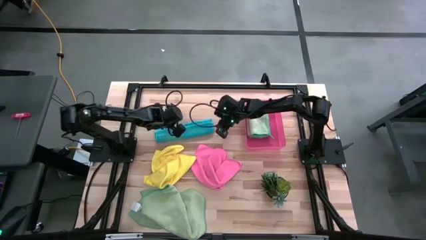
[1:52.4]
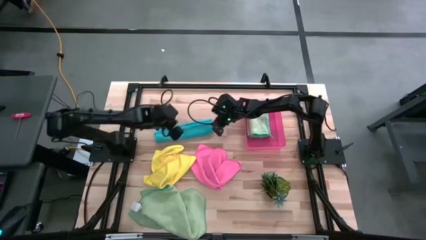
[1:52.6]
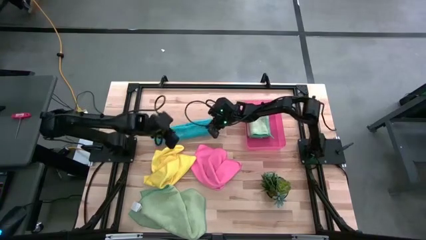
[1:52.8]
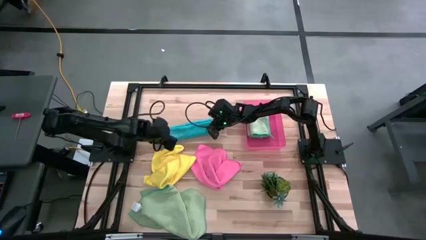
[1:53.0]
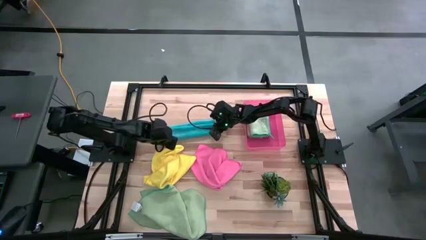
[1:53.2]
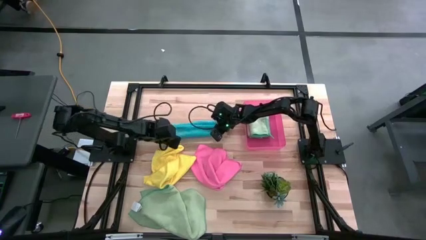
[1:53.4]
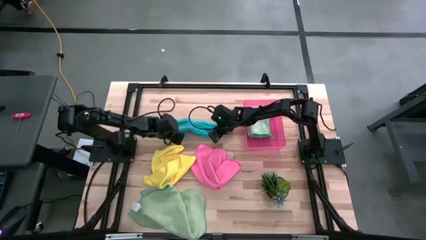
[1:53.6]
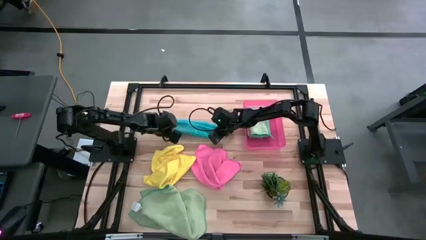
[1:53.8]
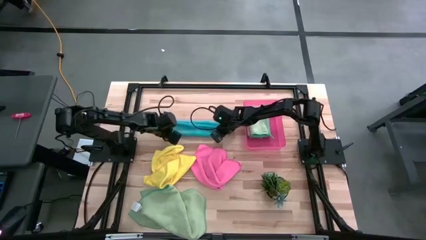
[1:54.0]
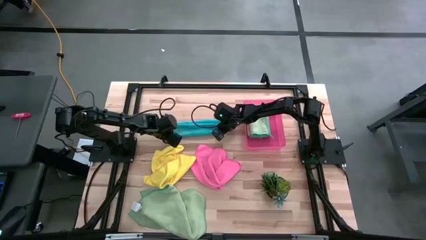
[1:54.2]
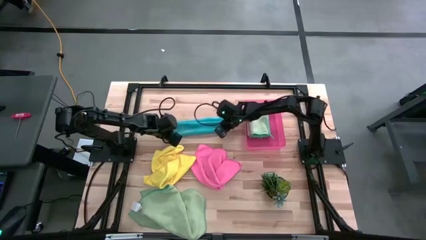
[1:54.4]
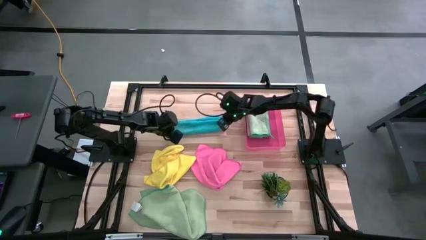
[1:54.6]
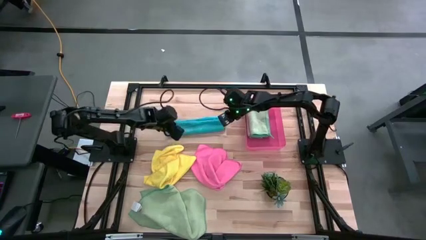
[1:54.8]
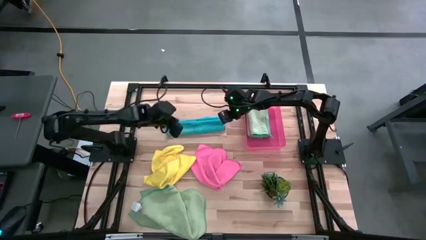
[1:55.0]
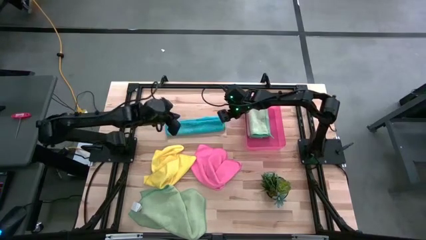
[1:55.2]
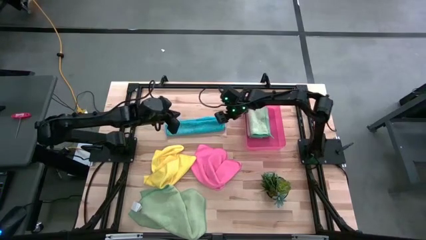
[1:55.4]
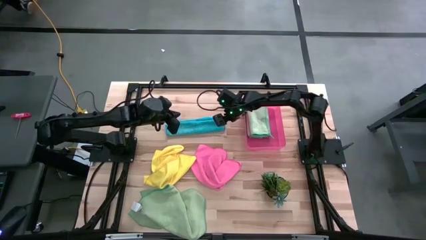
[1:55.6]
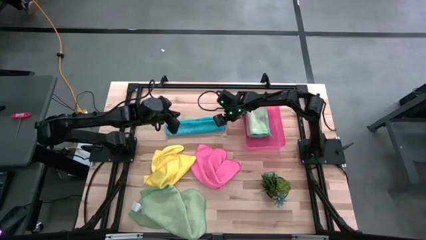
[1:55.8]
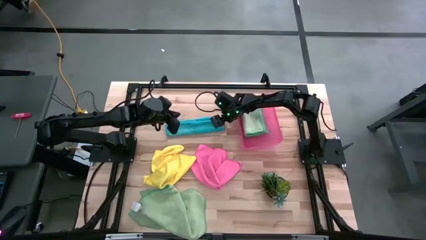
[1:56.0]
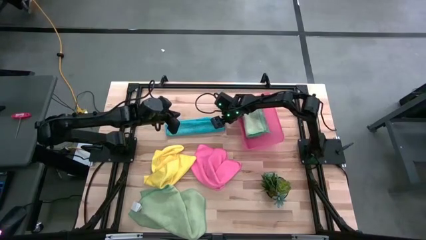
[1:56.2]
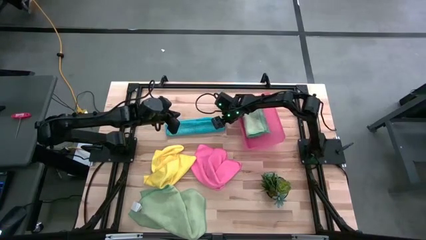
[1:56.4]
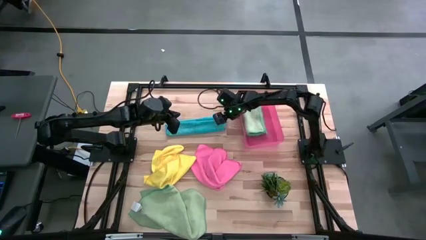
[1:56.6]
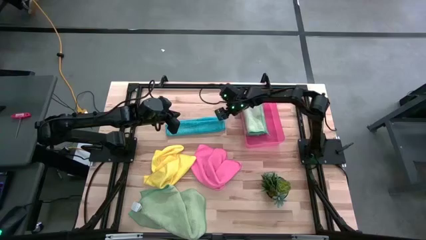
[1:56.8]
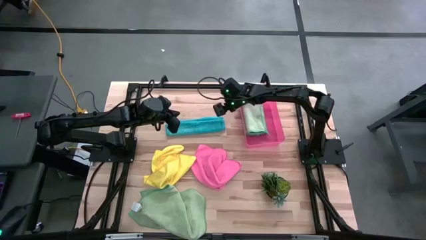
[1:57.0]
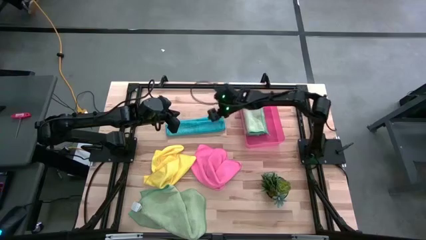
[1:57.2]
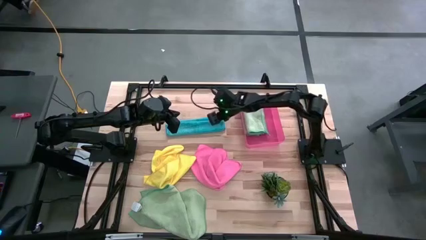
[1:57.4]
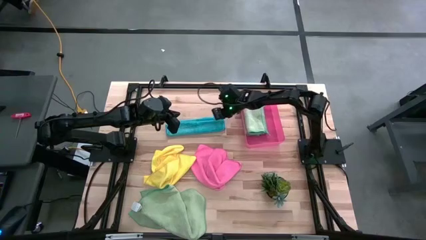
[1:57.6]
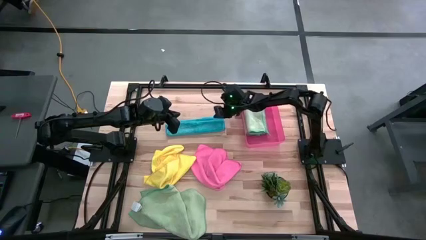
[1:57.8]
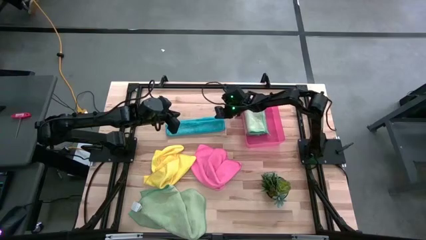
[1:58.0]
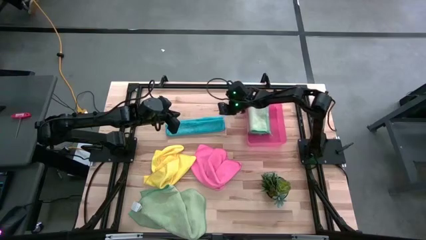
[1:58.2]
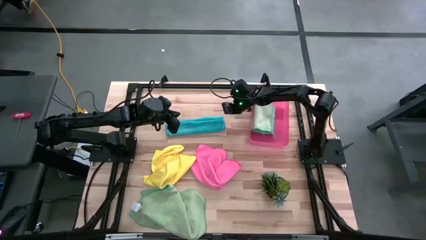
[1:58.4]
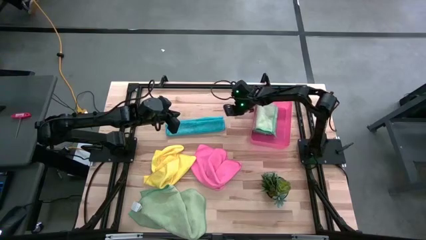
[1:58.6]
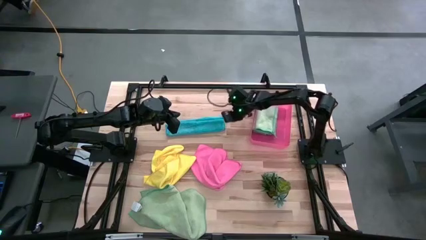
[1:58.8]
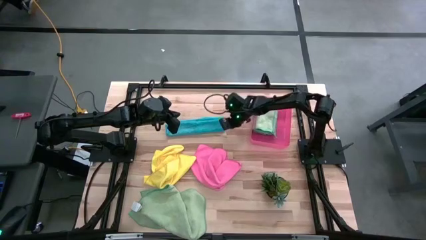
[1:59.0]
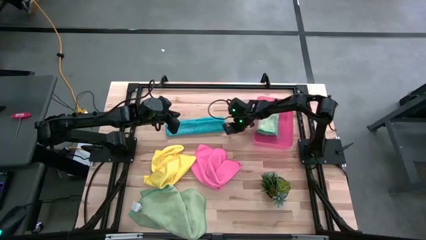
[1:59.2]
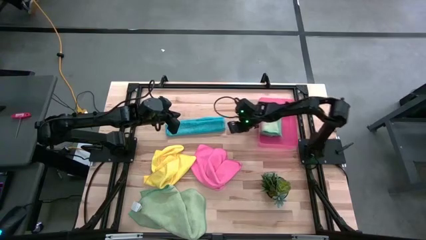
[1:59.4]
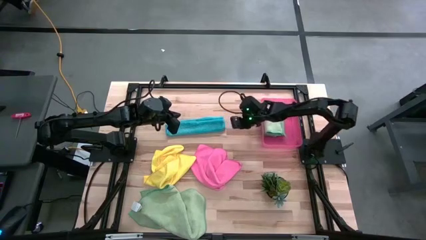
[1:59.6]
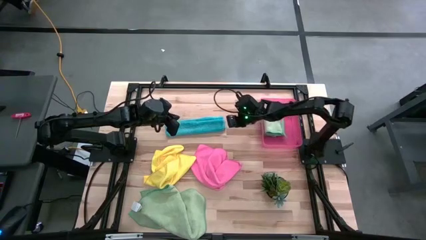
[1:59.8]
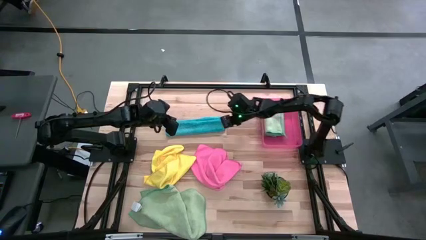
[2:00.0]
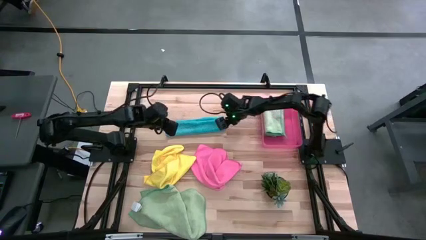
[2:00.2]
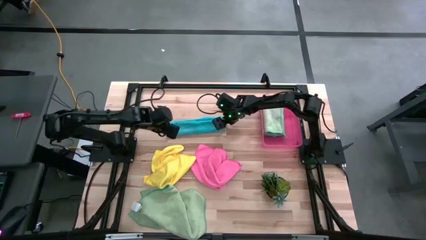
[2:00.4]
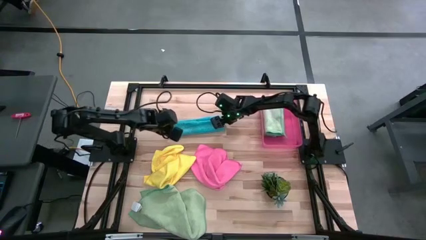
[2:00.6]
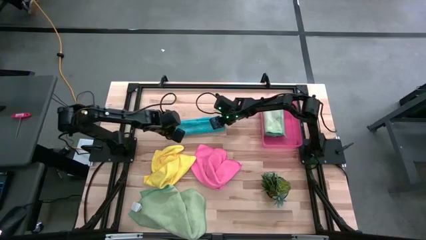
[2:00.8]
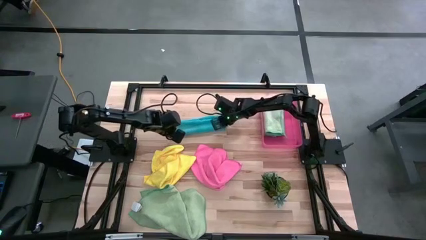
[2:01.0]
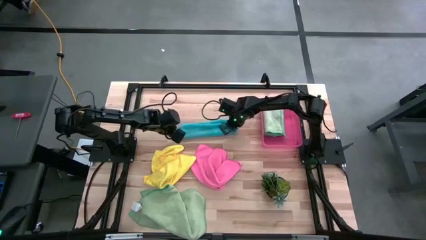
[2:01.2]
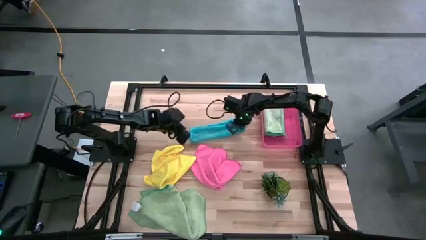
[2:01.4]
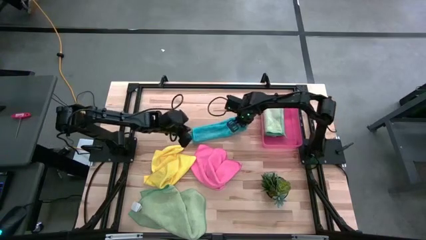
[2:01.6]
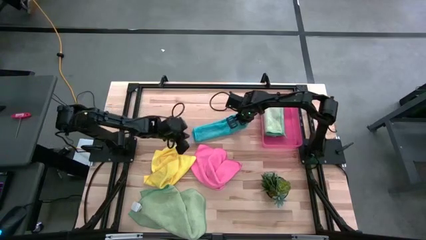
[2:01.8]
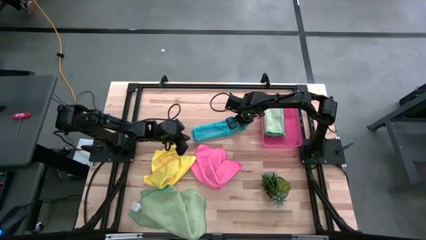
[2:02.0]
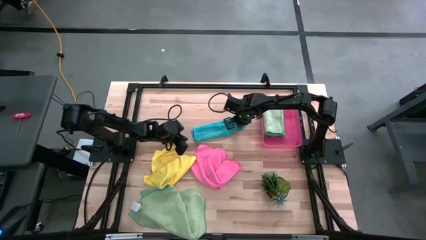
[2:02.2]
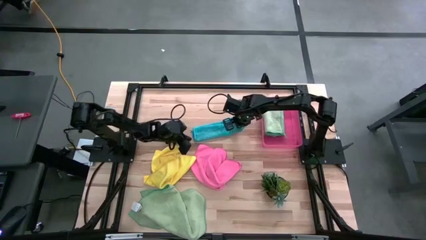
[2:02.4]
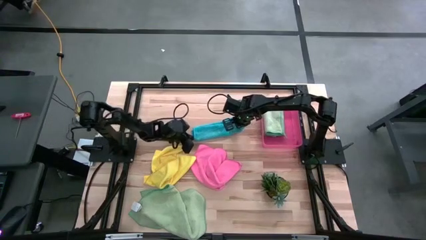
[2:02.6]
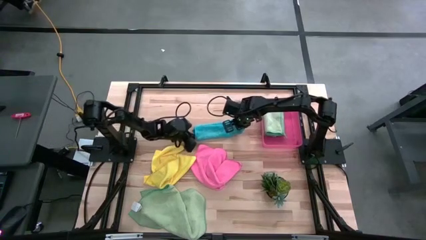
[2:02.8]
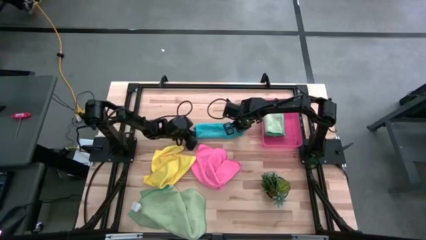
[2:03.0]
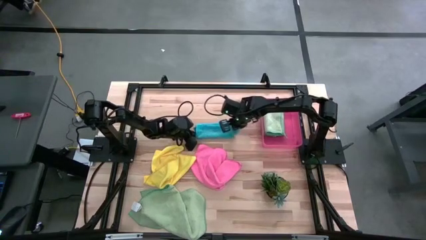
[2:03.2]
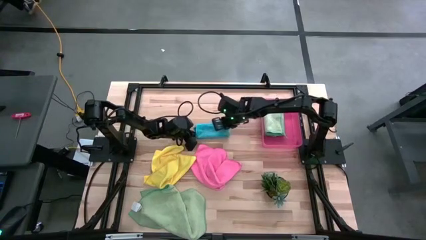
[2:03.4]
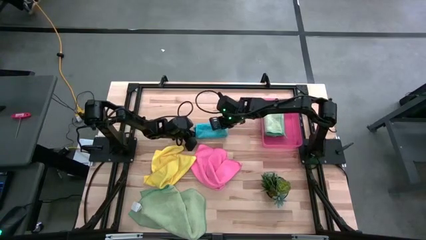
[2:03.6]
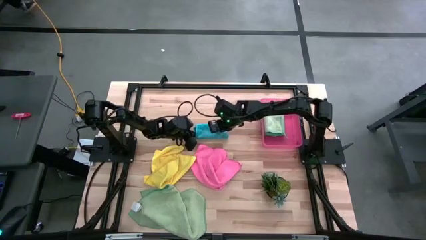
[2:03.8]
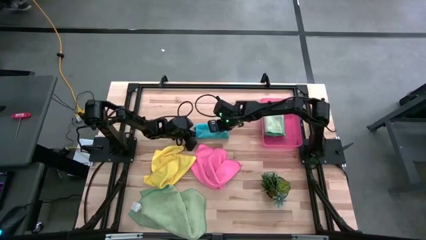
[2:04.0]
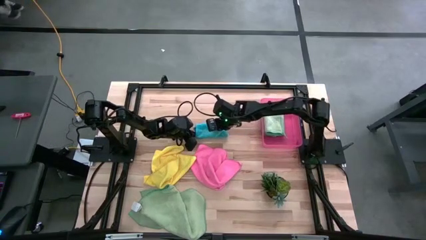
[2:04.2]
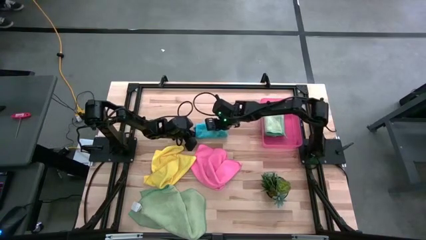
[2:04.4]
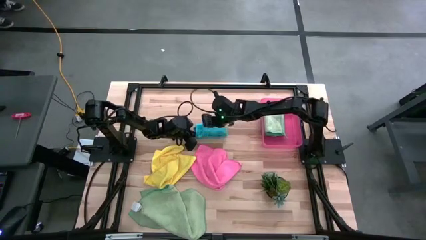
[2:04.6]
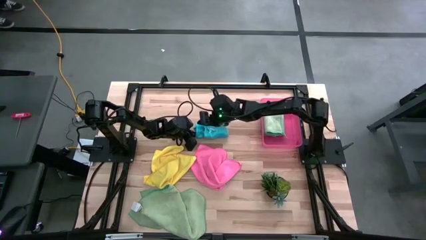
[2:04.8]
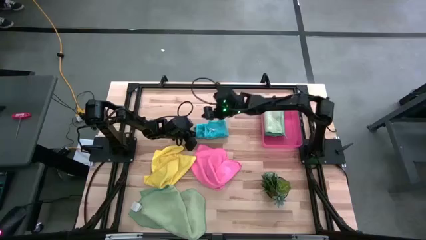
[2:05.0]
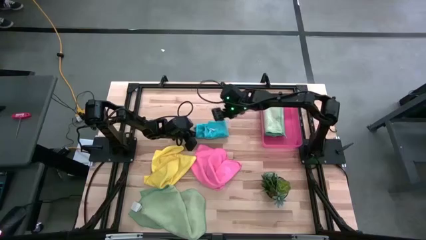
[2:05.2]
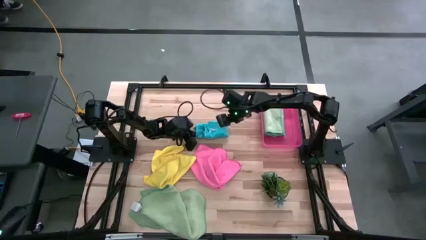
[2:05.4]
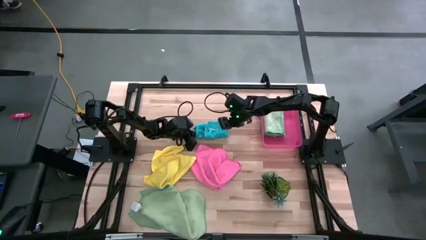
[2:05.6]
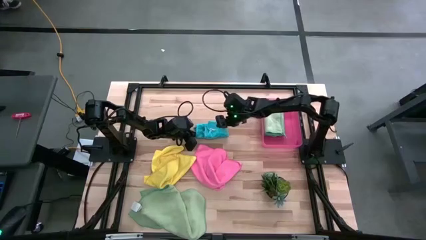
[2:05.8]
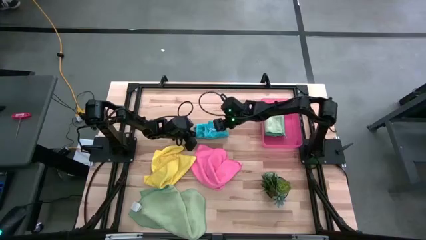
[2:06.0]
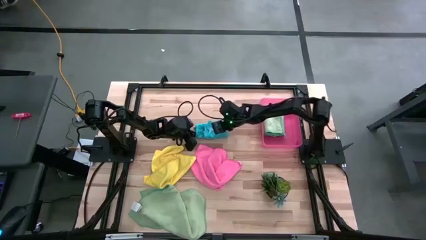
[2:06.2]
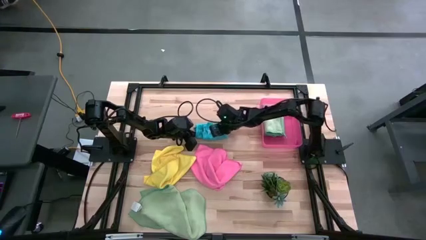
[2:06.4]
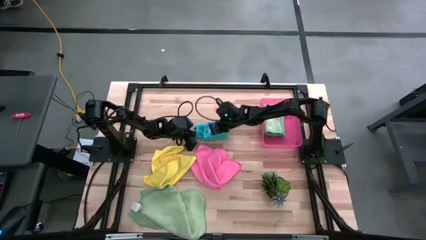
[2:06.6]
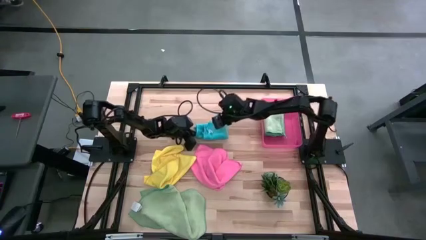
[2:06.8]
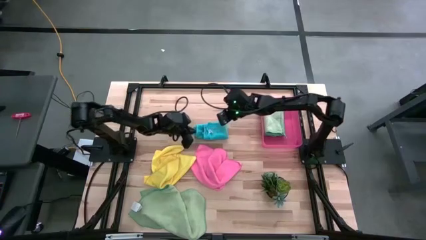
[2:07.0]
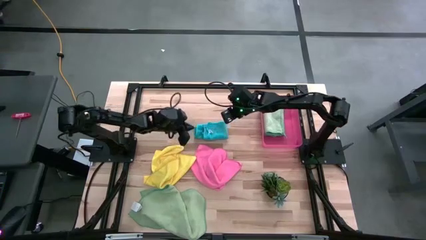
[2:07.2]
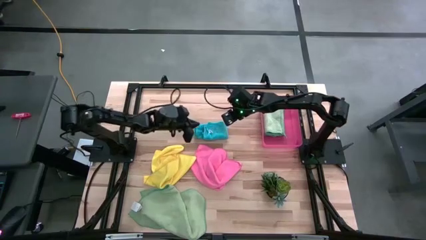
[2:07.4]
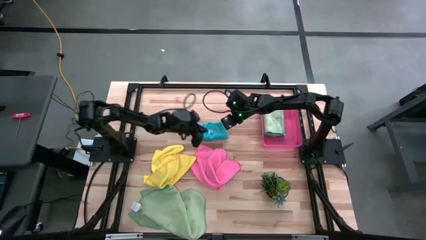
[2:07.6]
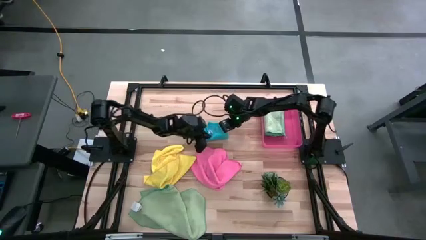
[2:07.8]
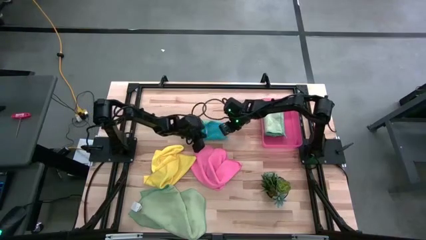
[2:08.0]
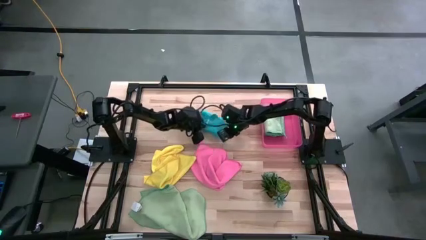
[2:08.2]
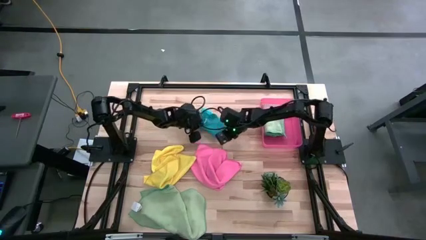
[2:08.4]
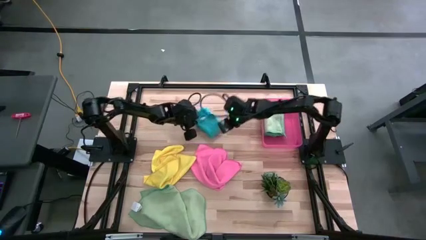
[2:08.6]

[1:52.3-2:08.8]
Task: Fold microfiber towels
Fold the blue microfiber cloth
